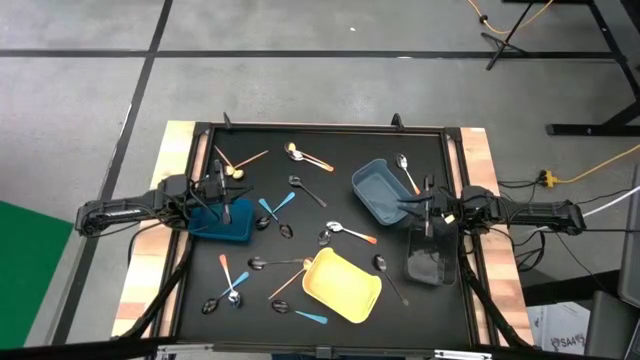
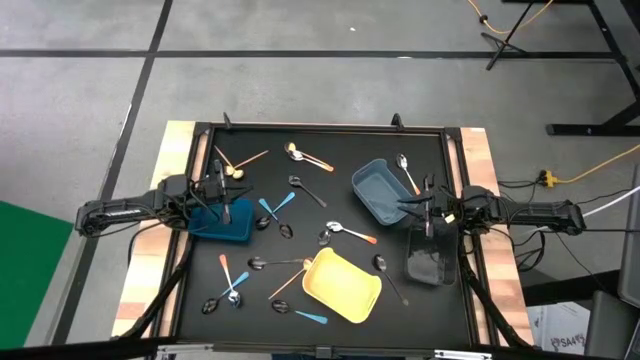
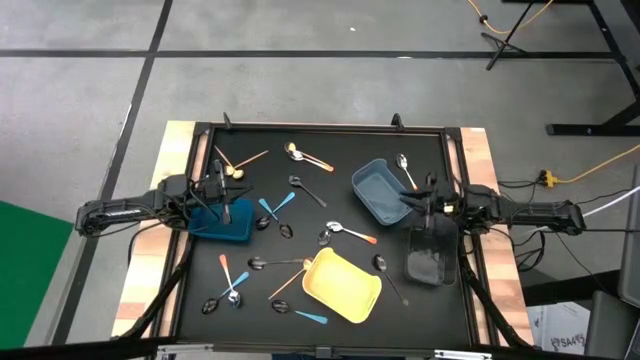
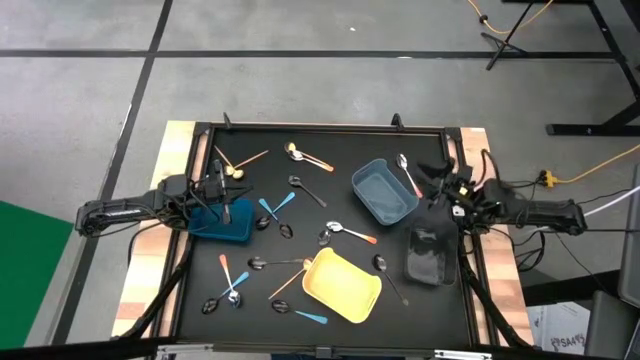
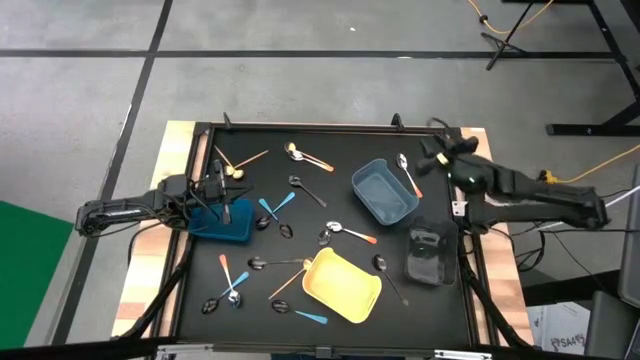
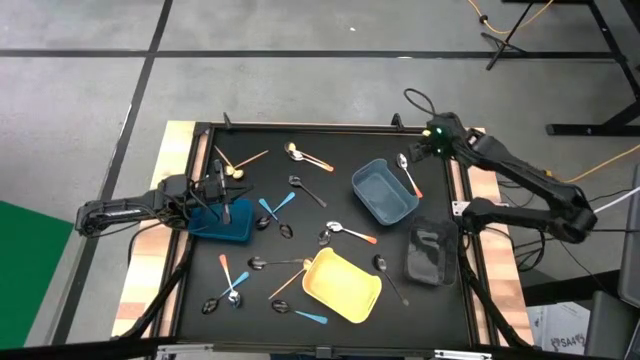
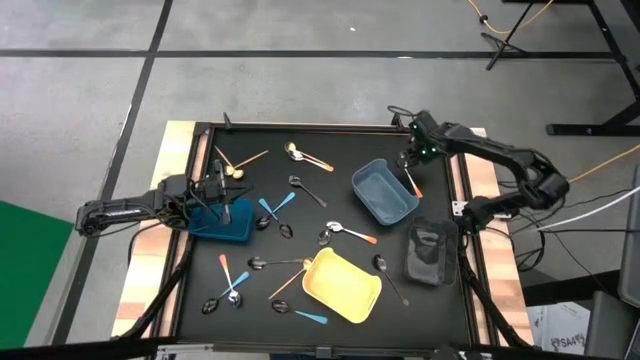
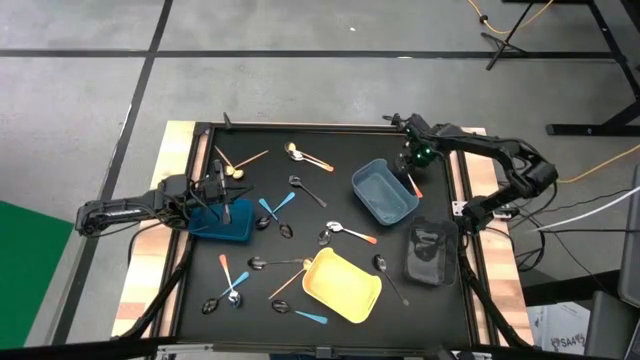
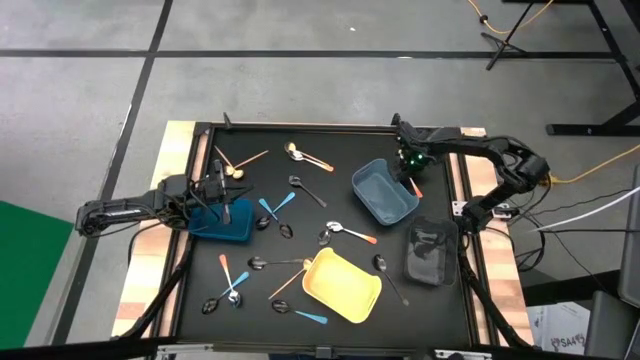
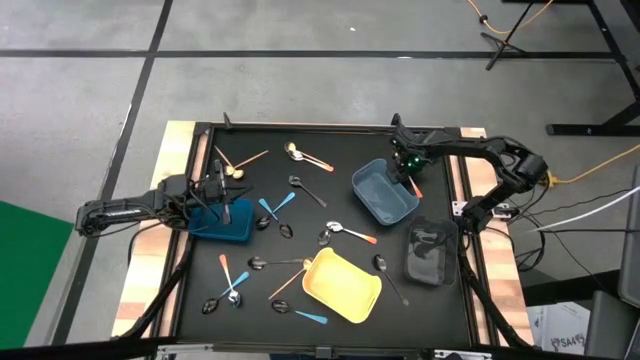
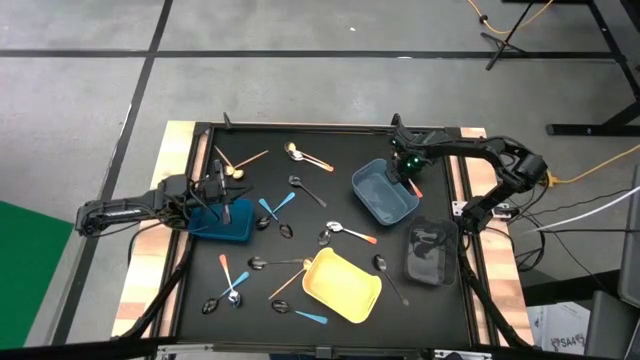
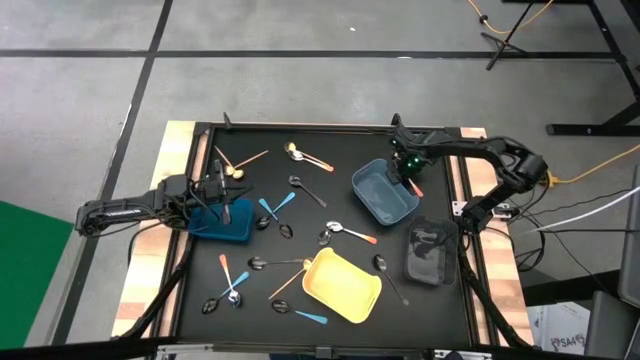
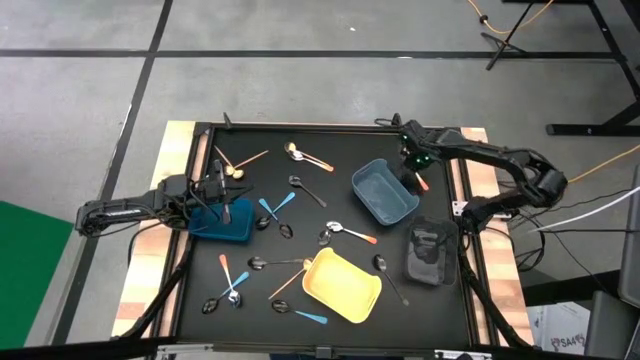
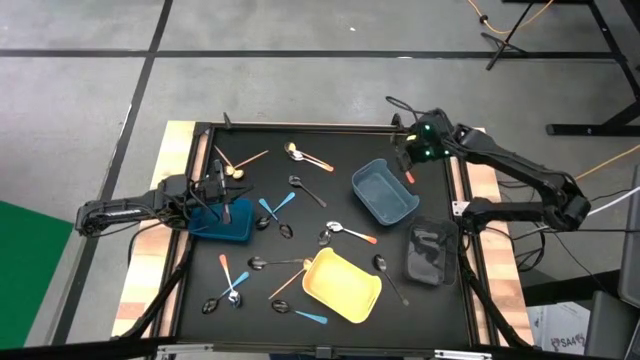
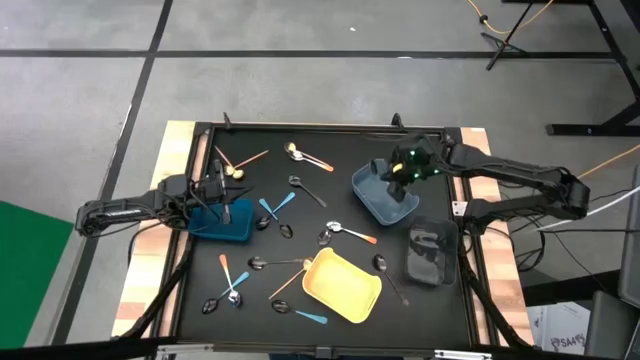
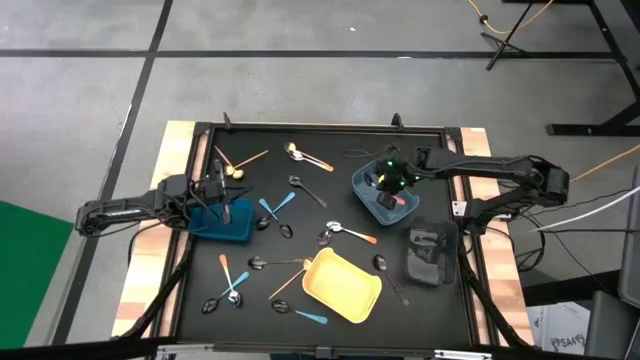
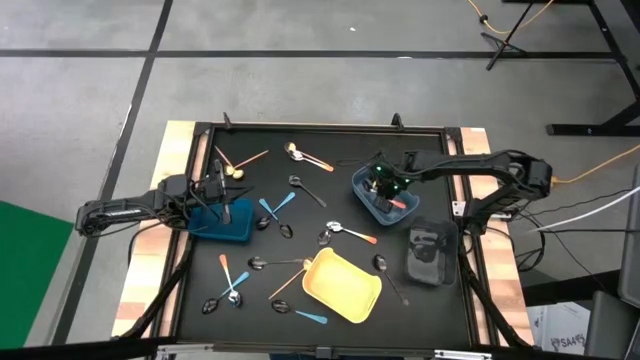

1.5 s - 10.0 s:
Task: Sort silverware by color (type)
Put the orange spoon into the gray bin

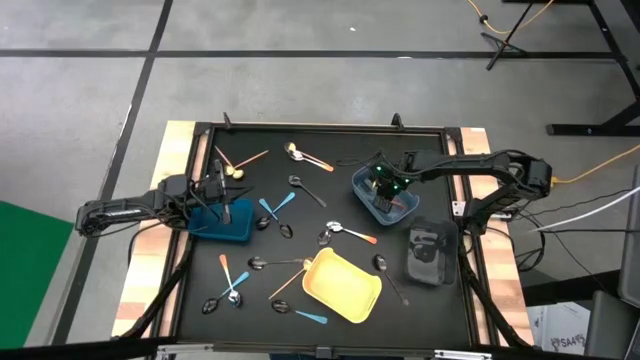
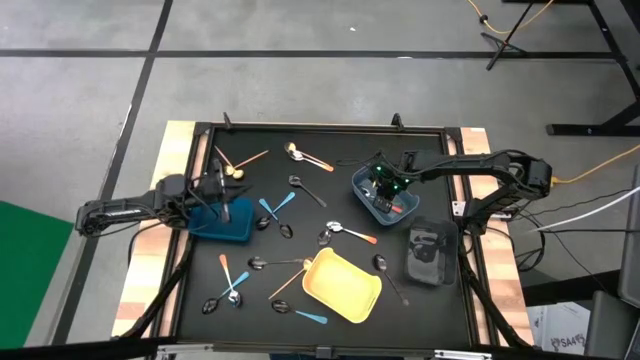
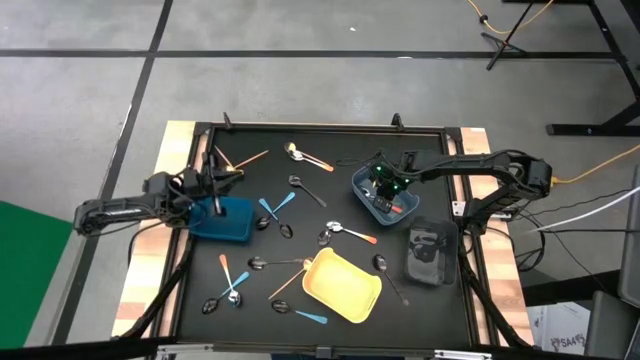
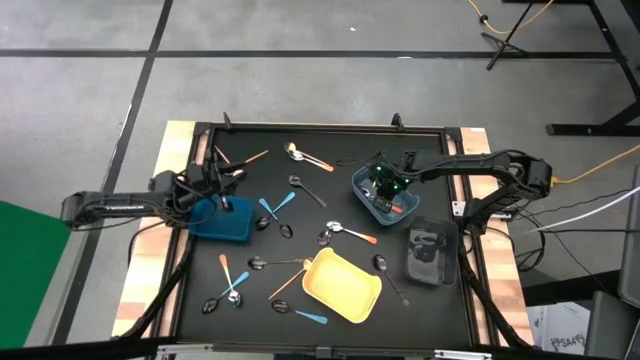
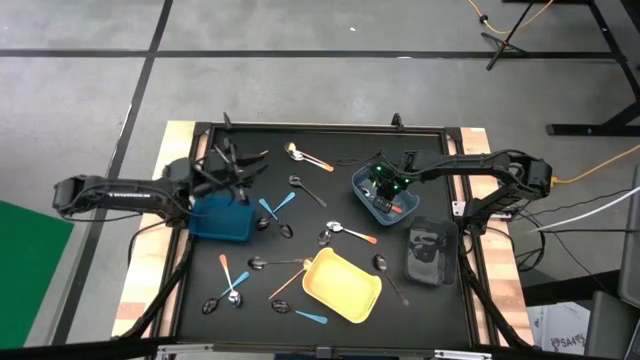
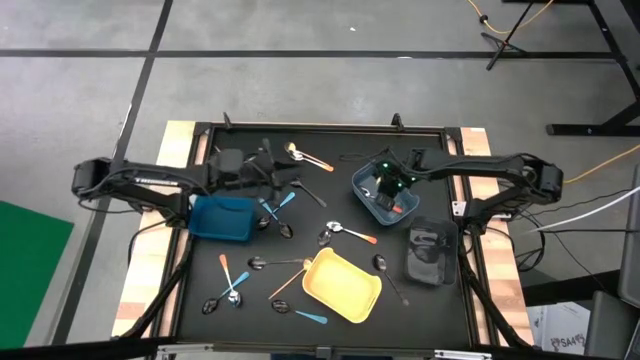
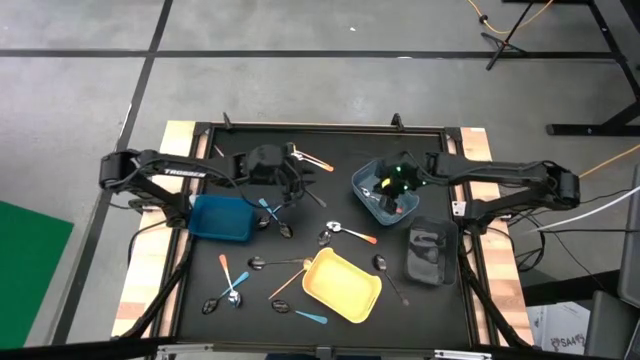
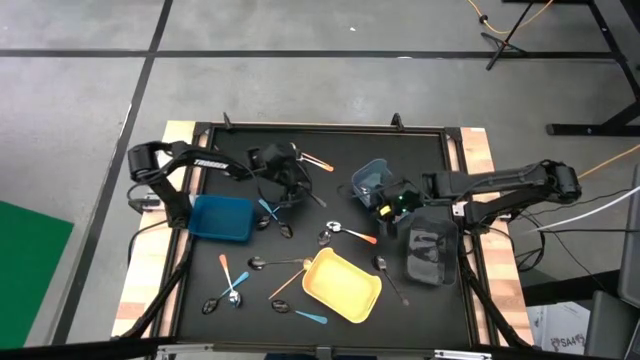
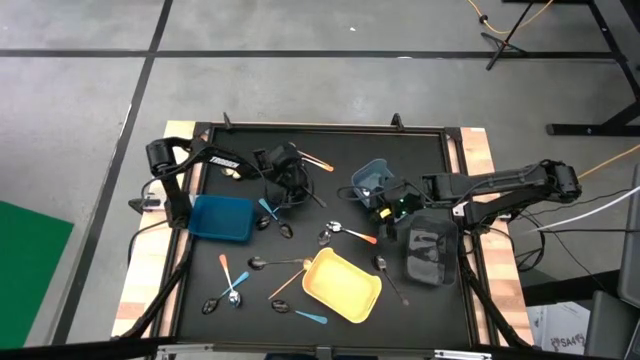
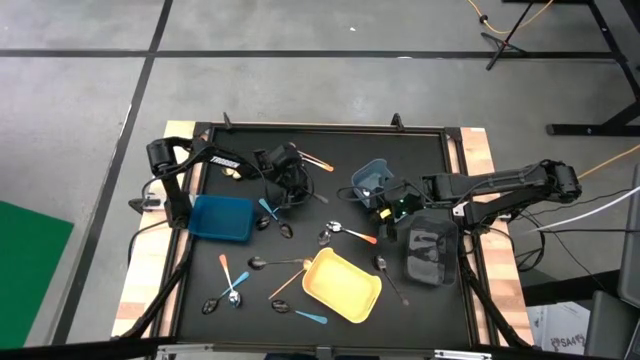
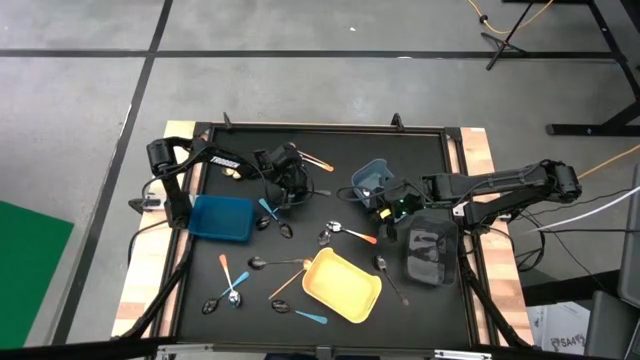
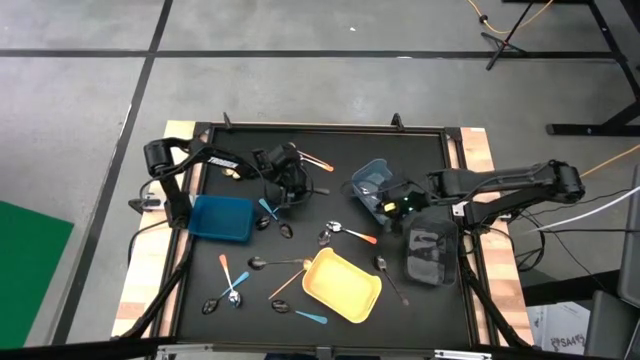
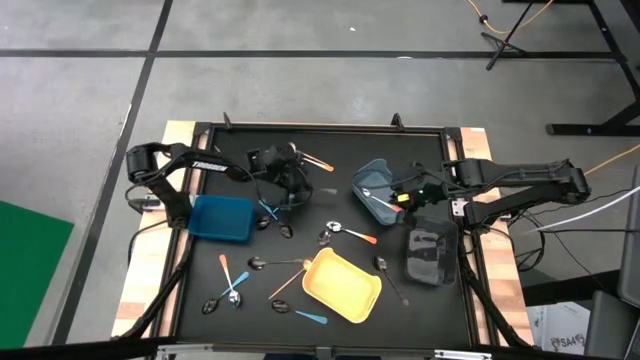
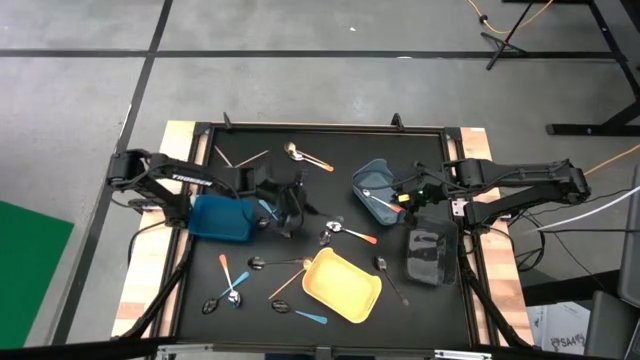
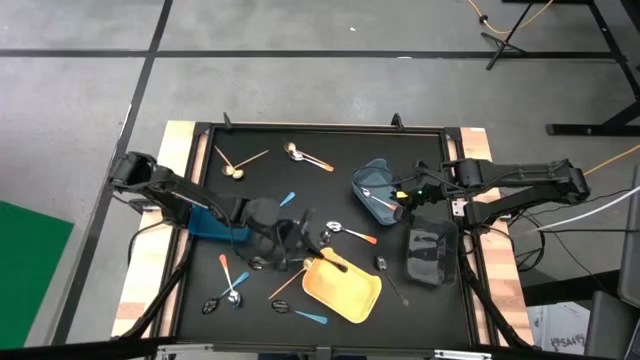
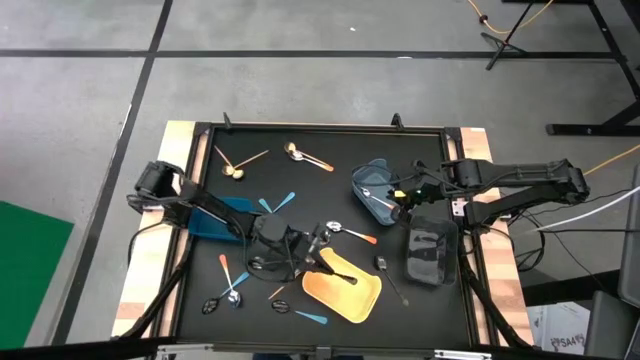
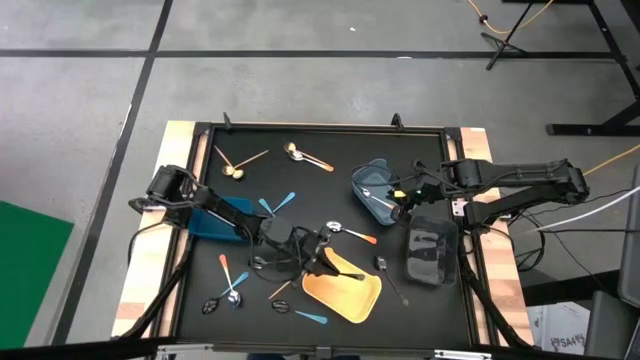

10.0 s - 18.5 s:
Put the black spoon into the yellow bin

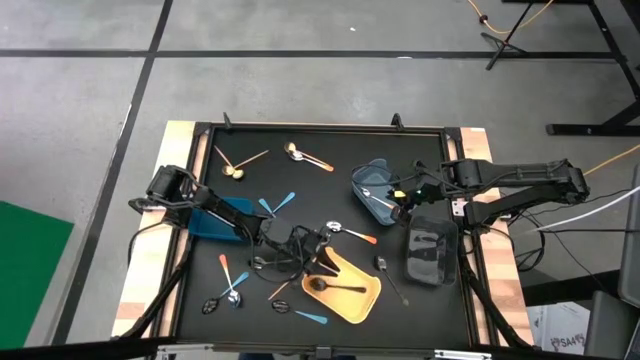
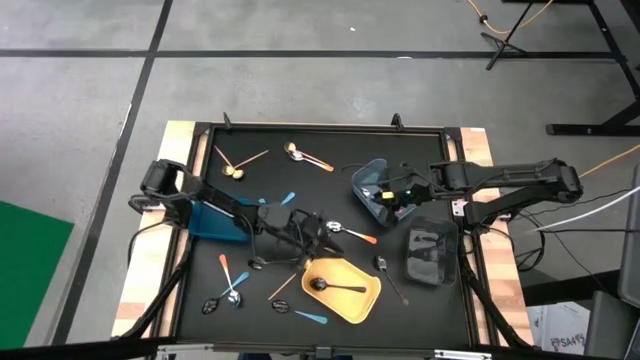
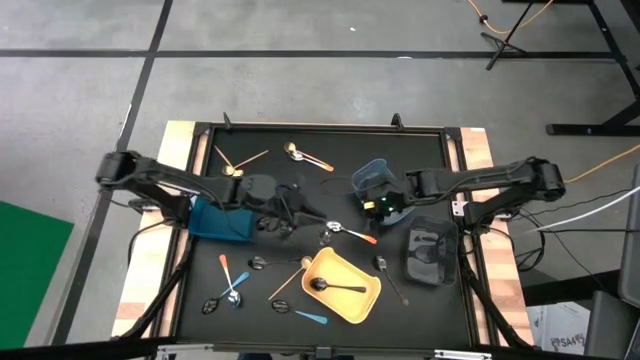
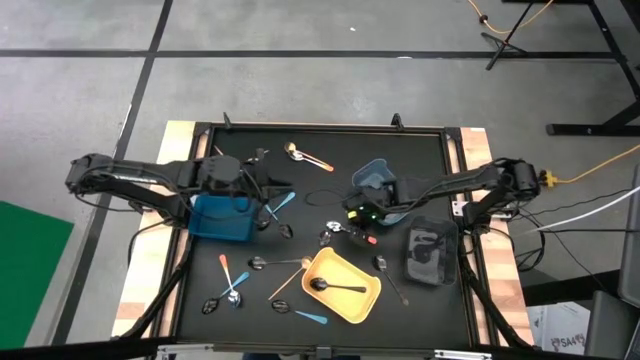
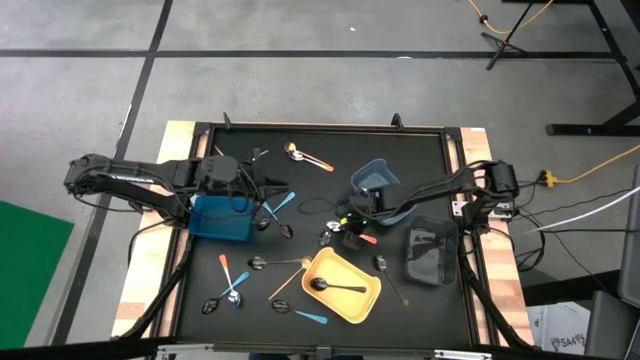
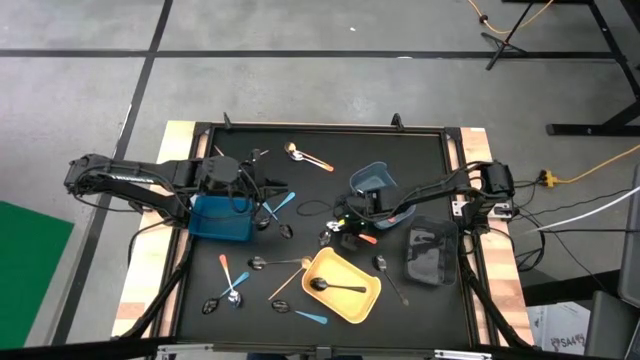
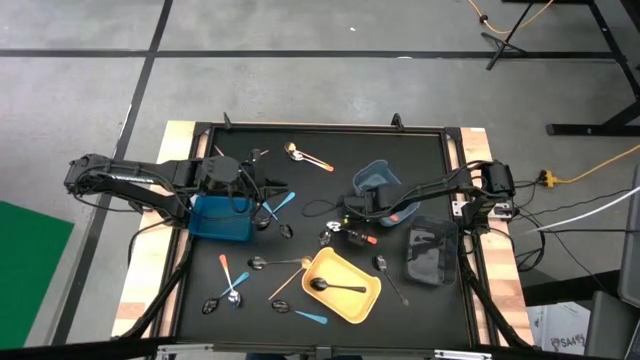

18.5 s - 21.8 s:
Adjust the gray bin
